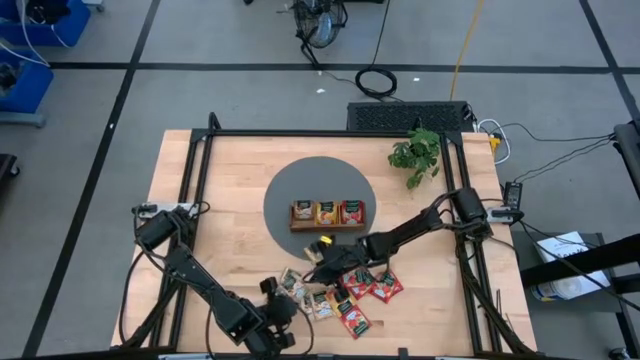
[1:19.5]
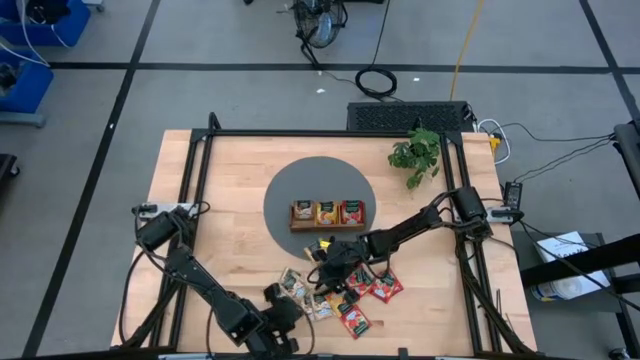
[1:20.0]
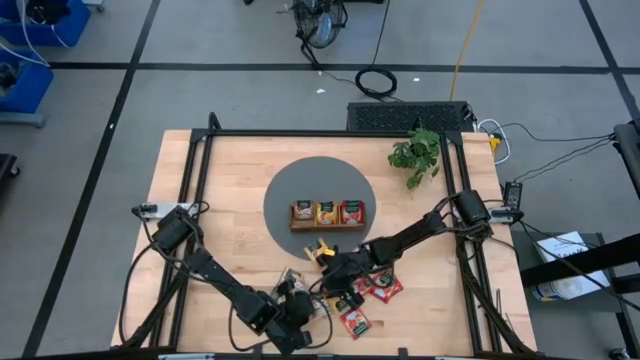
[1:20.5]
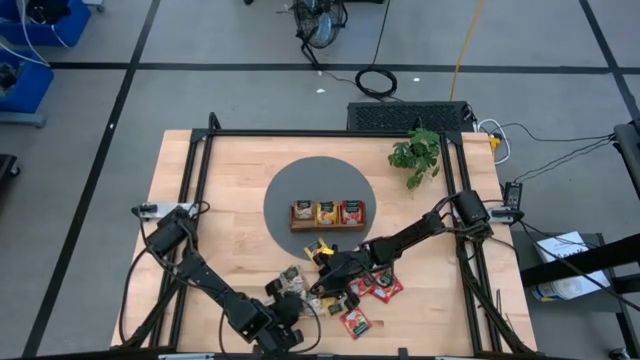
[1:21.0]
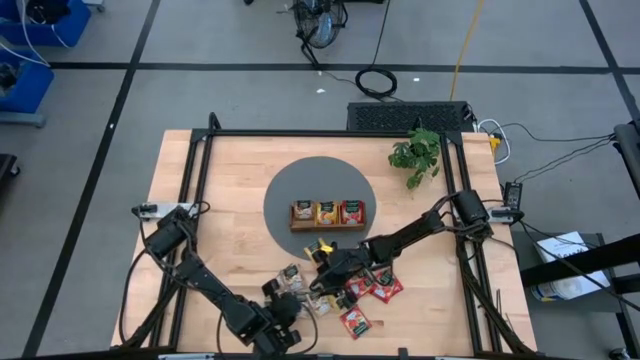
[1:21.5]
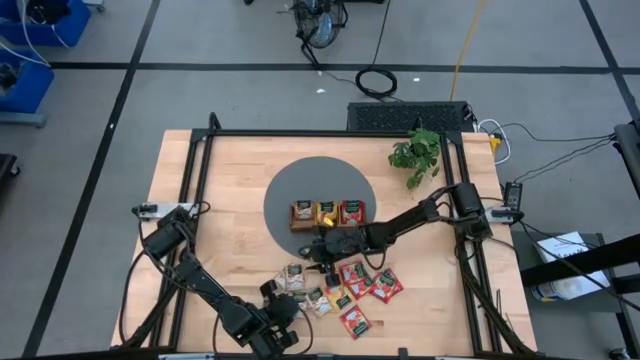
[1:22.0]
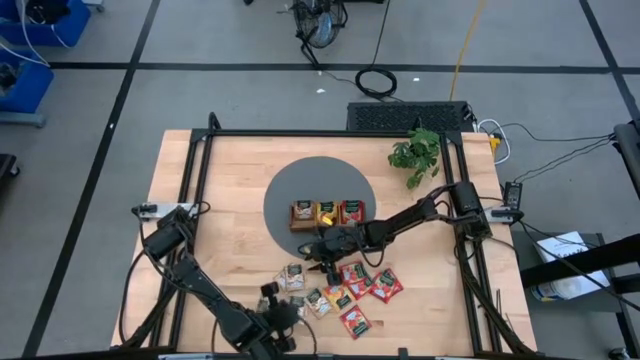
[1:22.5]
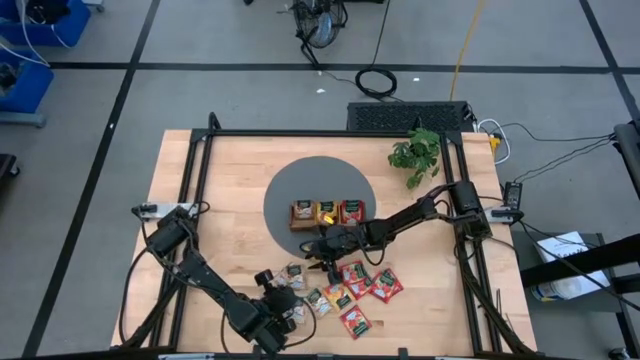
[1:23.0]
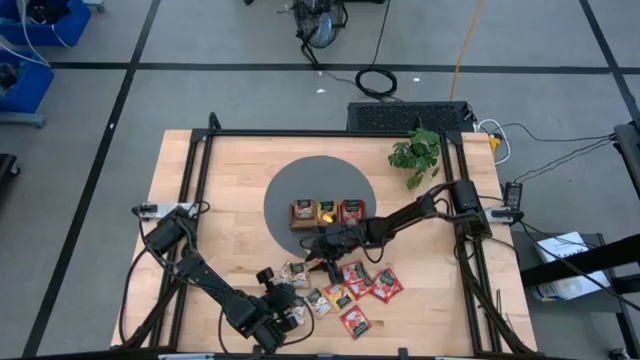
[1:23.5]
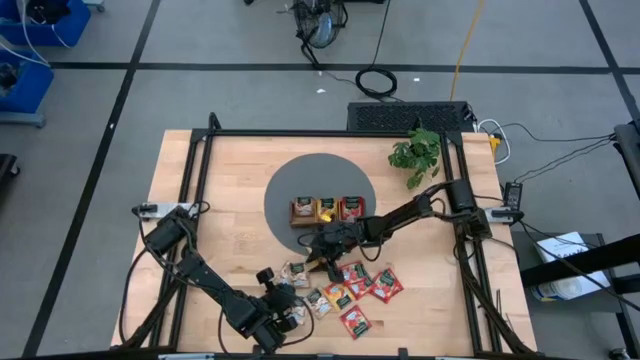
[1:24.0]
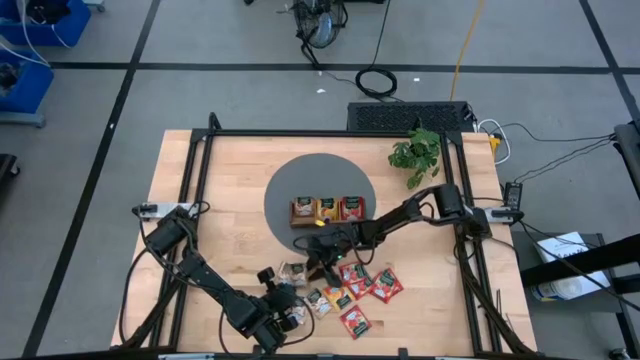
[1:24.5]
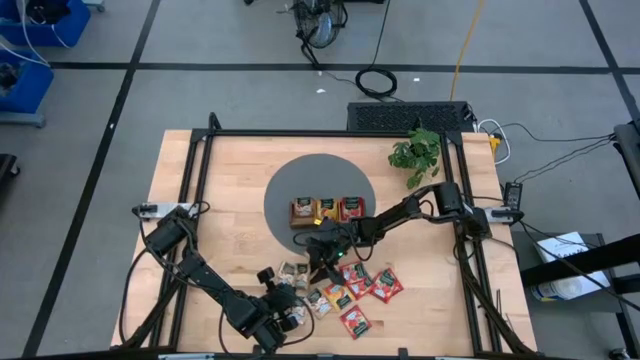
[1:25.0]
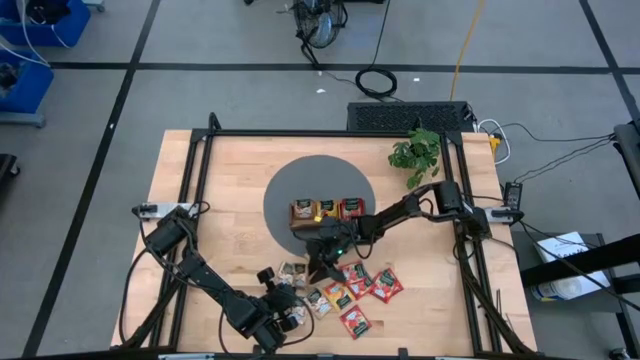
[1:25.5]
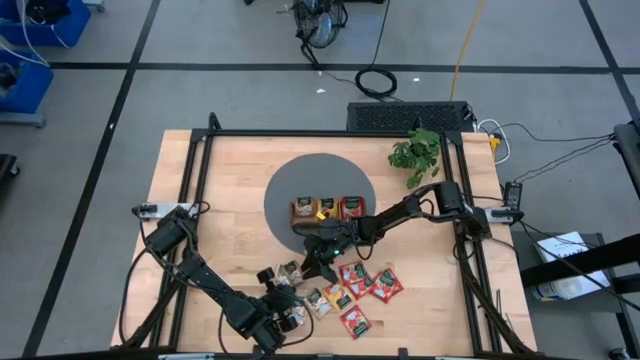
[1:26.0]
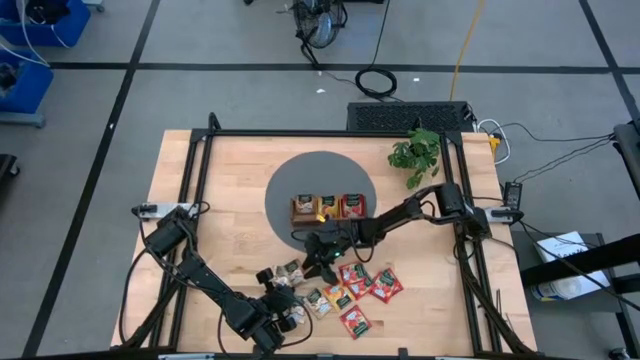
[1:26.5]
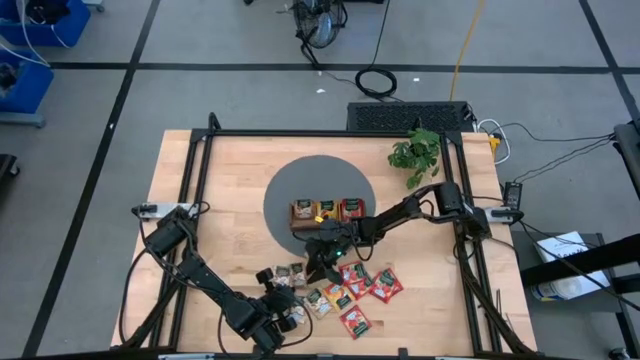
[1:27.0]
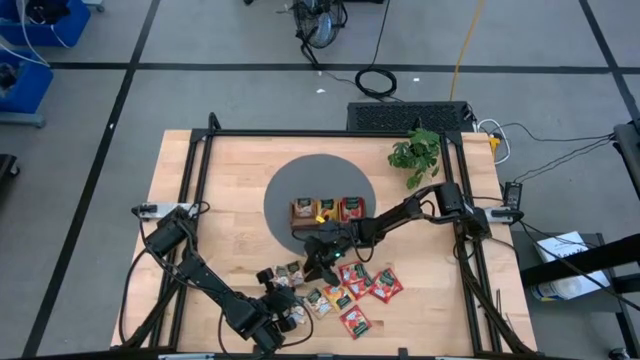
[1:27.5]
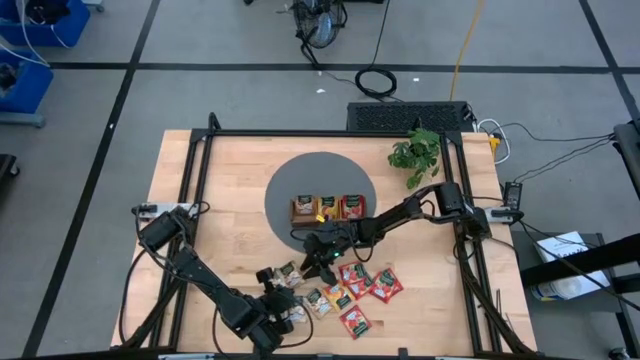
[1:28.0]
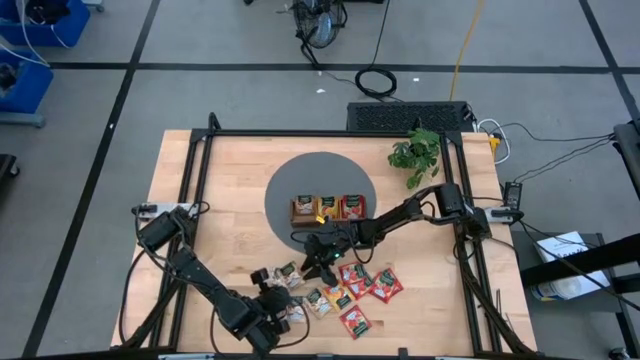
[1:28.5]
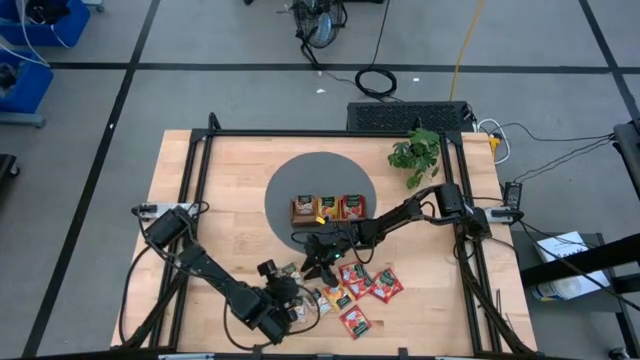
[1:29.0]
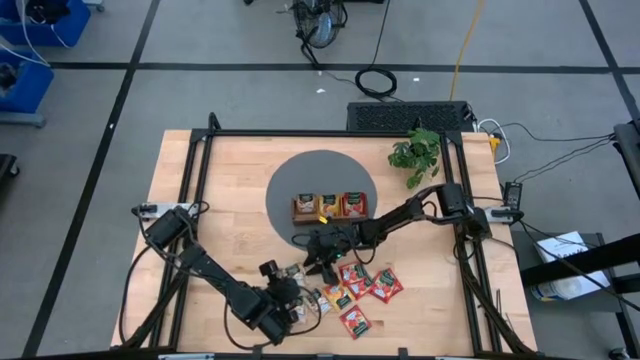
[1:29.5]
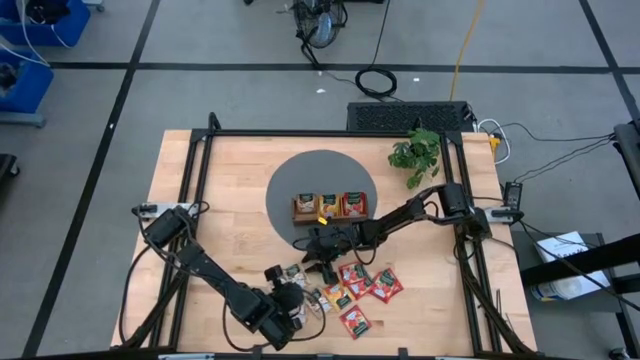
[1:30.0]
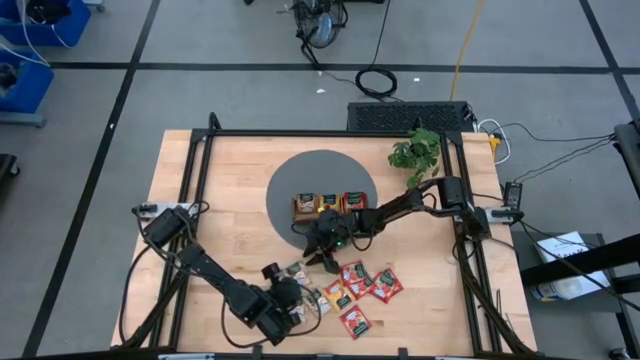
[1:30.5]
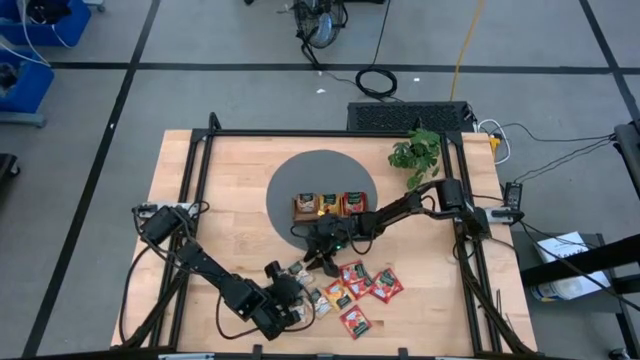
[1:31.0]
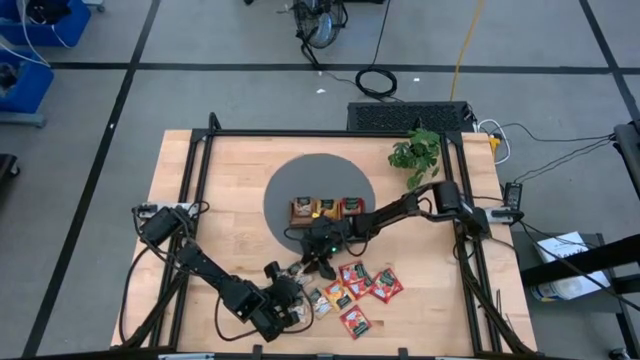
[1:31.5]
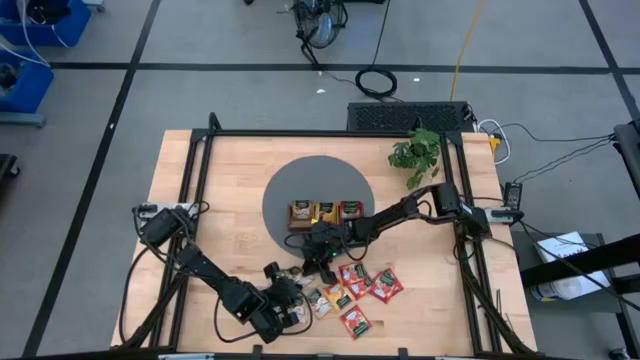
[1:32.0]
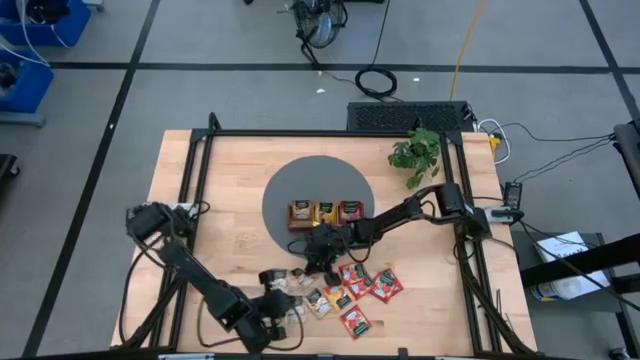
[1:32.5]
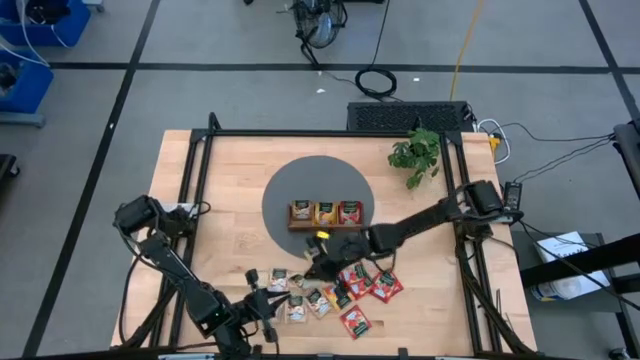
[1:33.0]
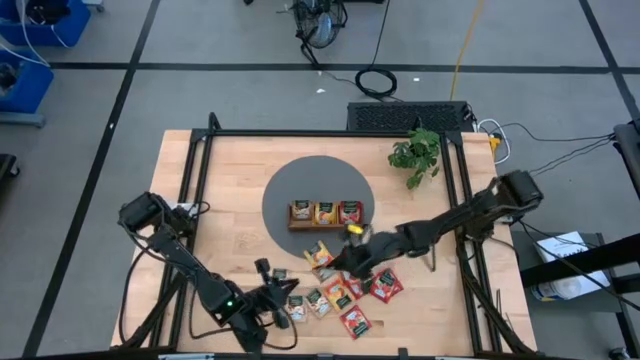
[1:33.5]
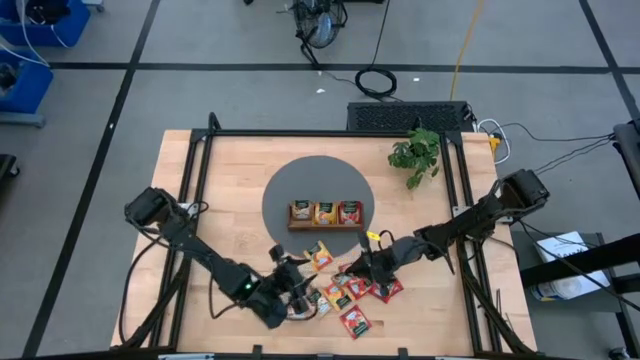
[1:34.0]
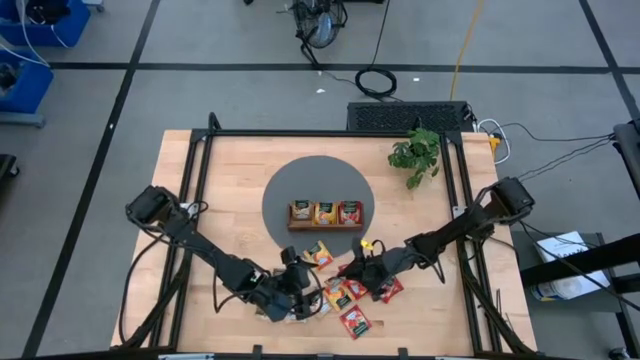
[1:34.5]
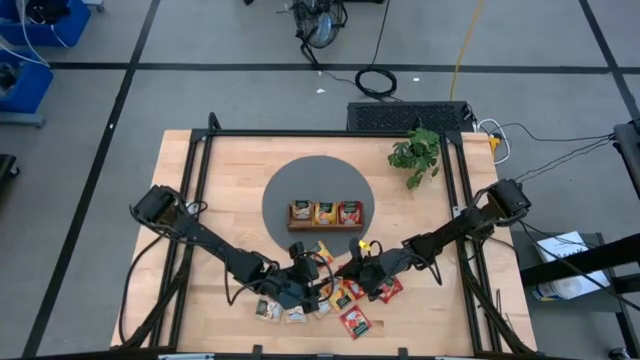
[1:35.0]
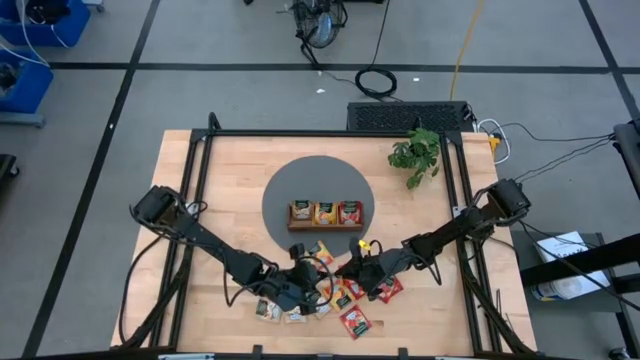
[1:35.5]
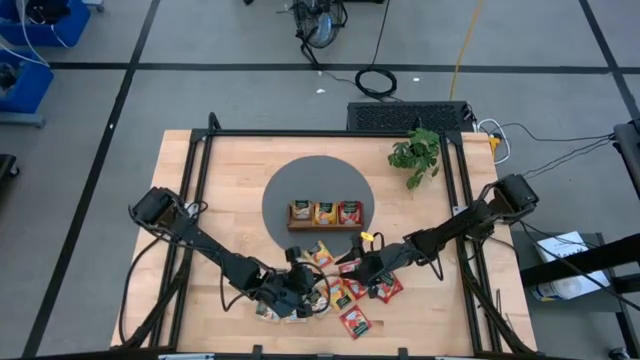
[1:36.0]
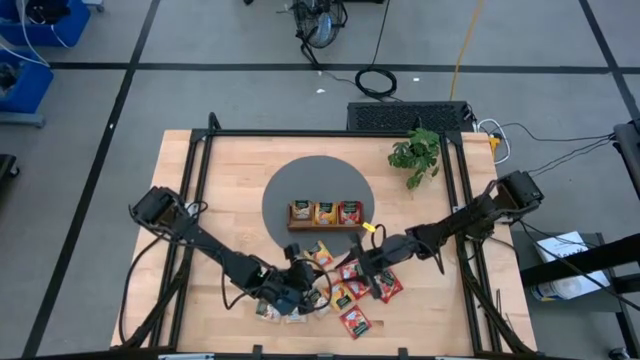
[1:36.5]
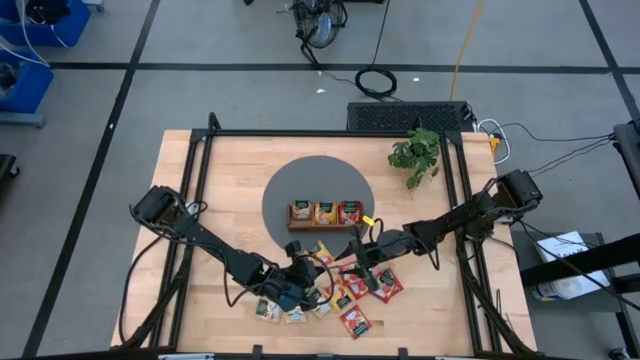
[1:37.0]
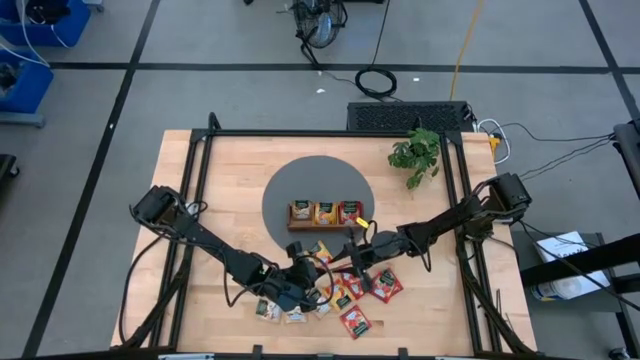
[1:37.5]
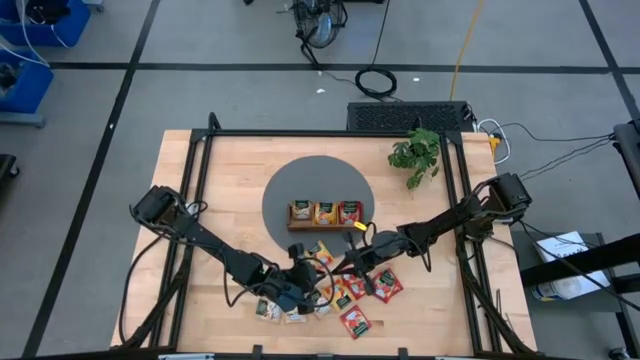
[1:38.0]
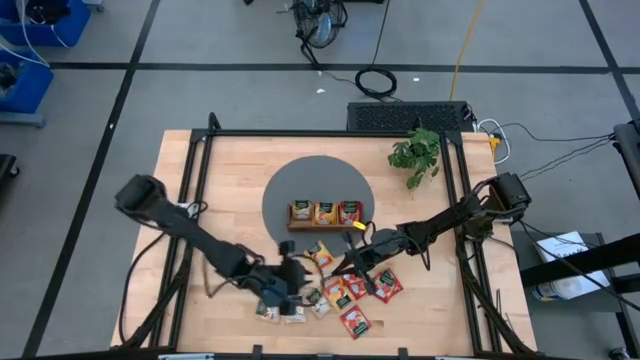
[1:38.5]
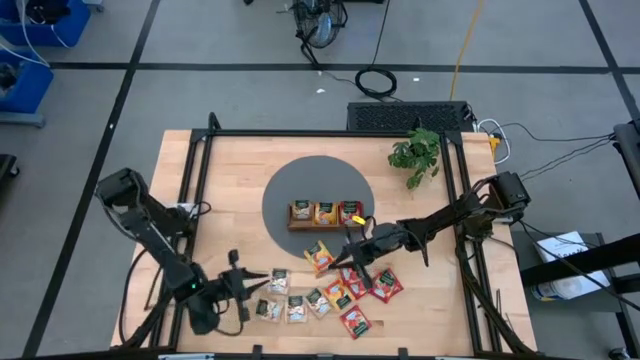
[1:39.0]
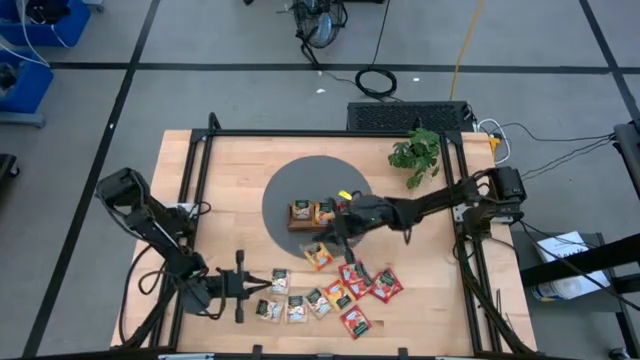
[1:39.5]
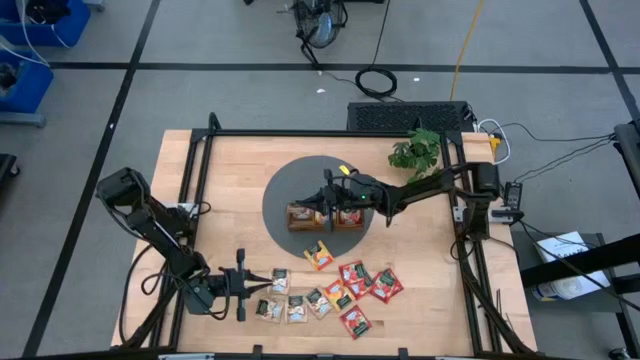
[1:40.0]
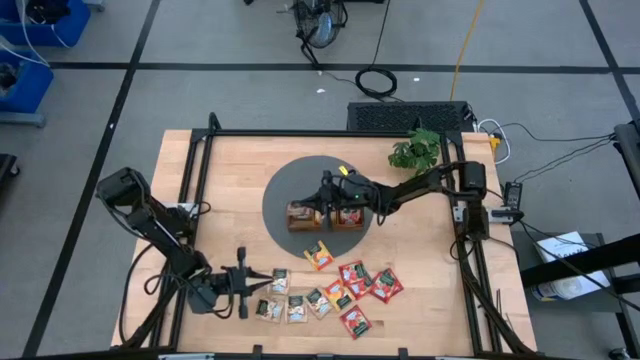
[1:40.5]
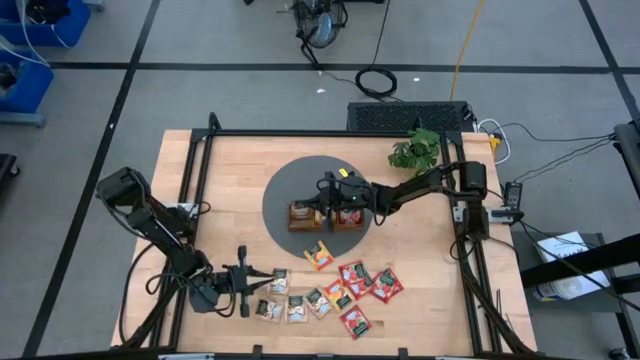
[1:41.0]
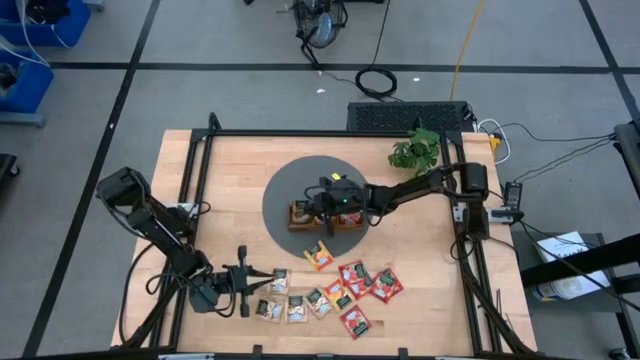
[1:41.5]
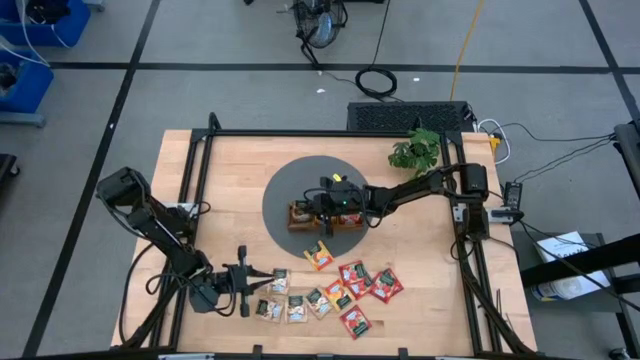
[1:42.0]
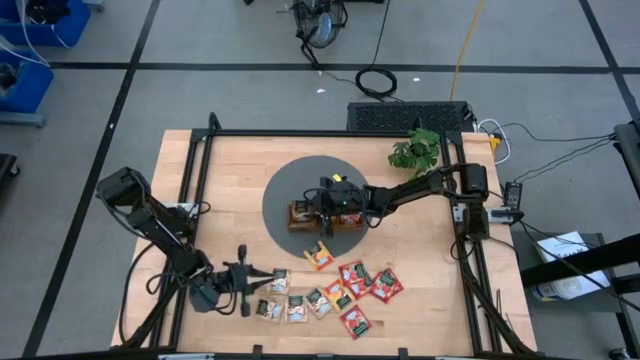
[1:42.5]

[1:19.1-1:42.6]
Task: Pick & Place Tea
Put the cinnamon tea sachet into the left compartment of the wooden organizer
